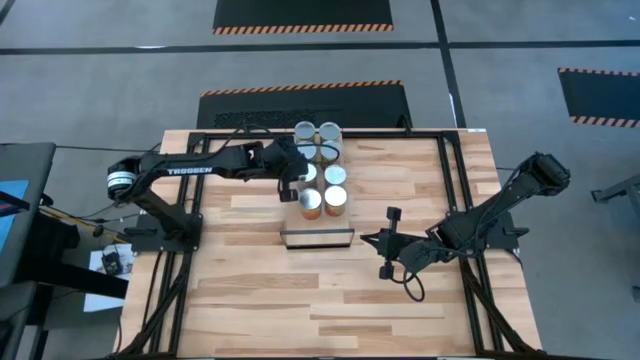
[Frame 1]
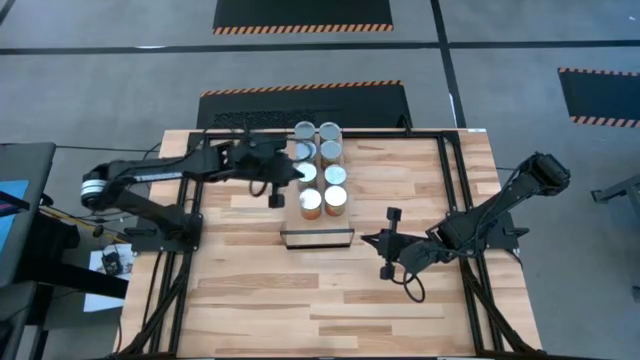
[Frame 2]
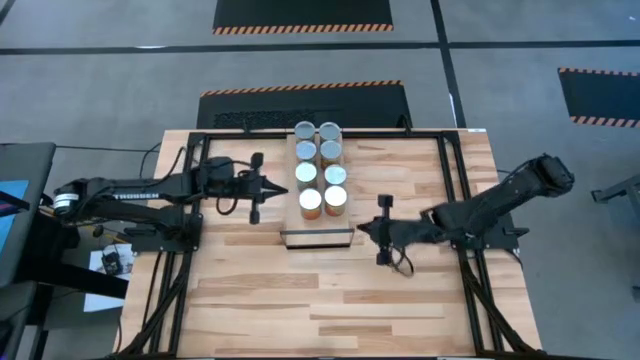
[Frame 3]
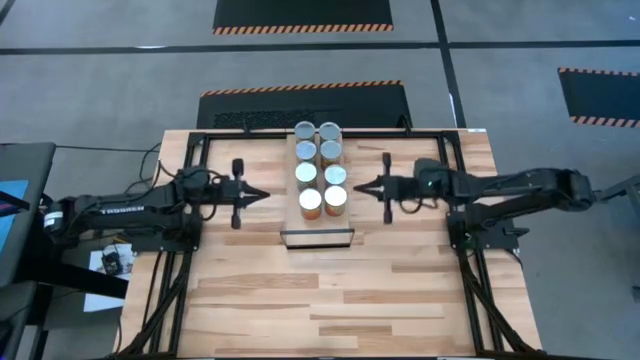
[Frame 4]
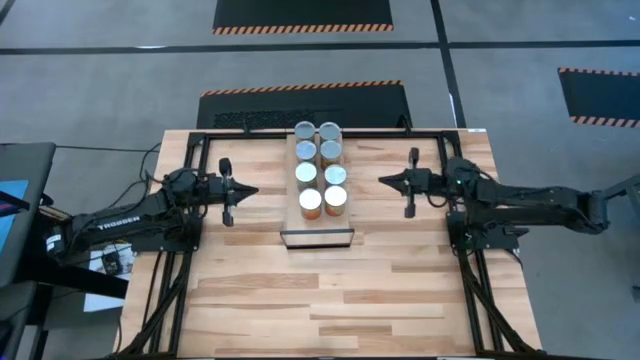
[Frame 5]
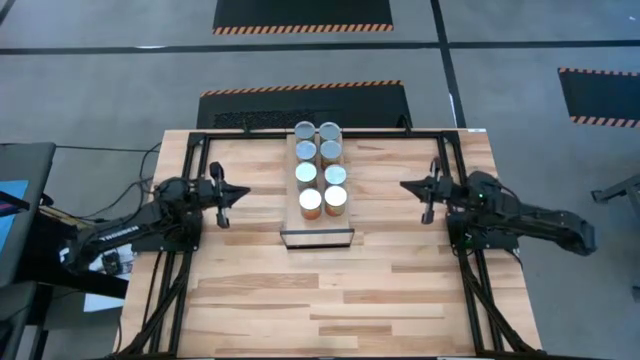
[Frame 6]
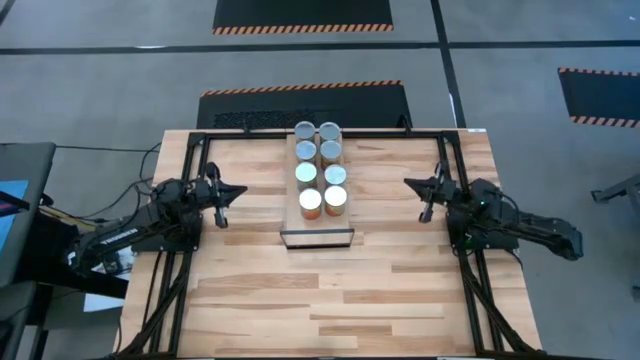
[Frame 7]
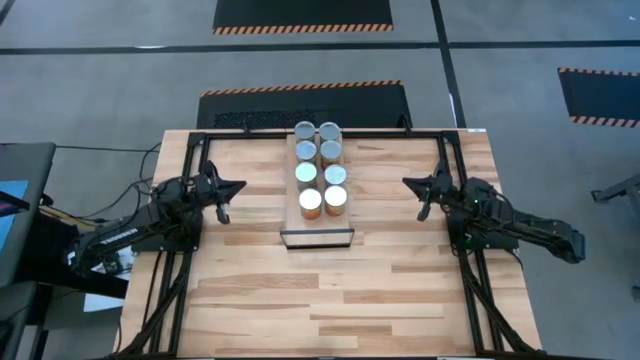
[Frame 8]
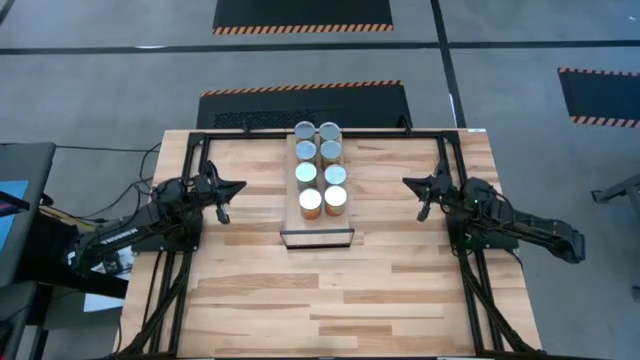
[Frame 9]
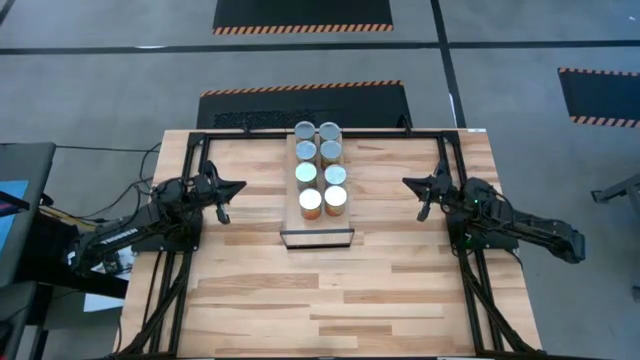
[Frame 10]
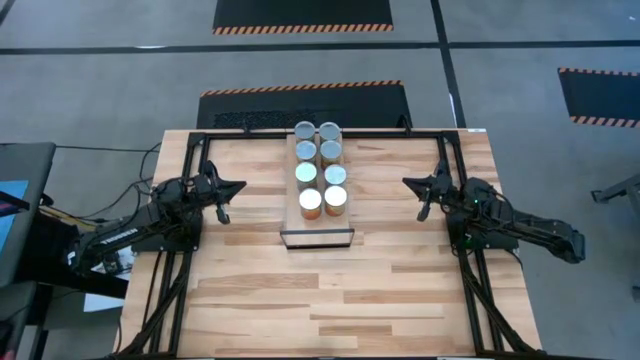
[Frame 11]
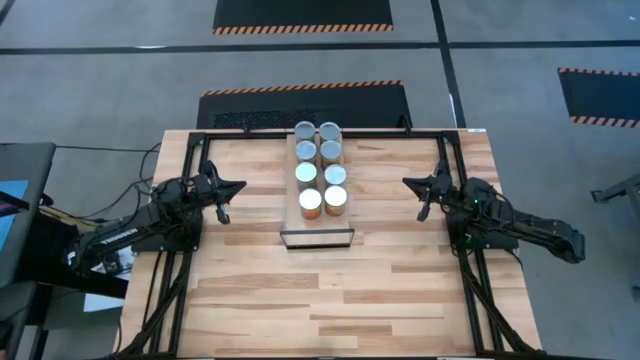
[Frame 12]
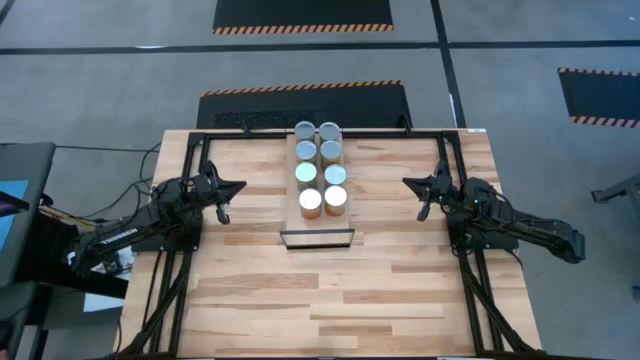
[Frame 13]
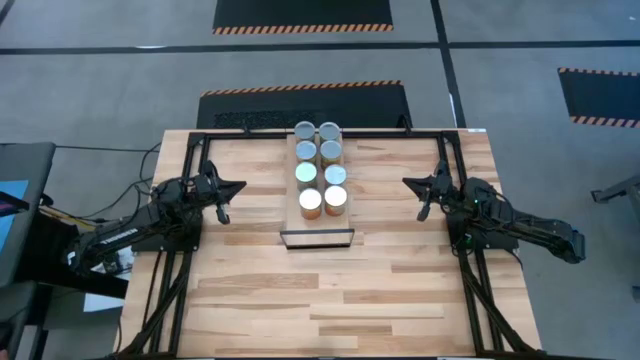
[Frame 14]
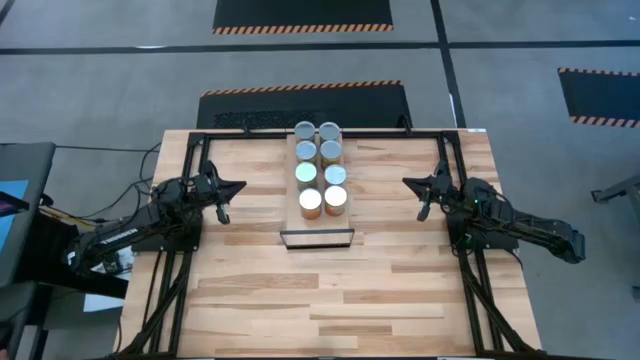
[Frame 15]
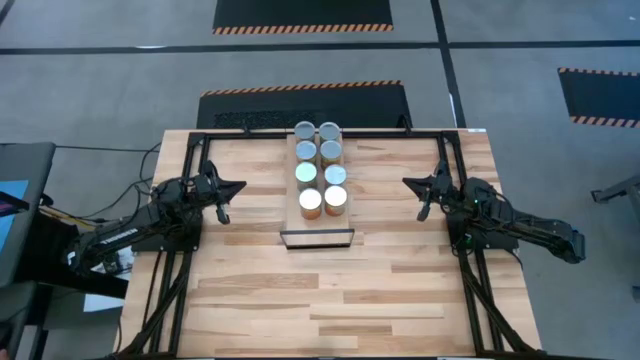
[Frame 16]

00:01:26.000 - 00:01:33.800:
Task: Pick and place cans onto a shelf
Return to Home Position

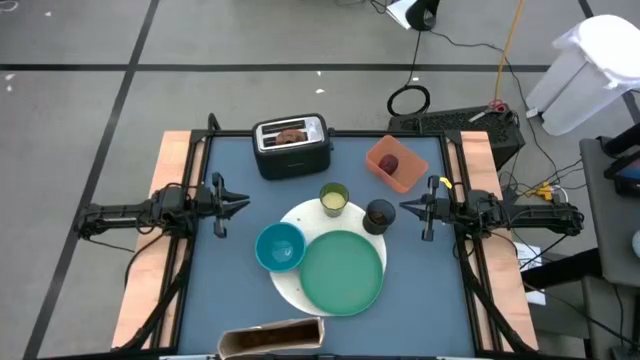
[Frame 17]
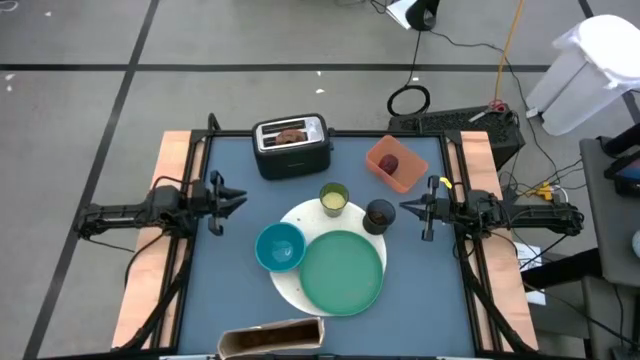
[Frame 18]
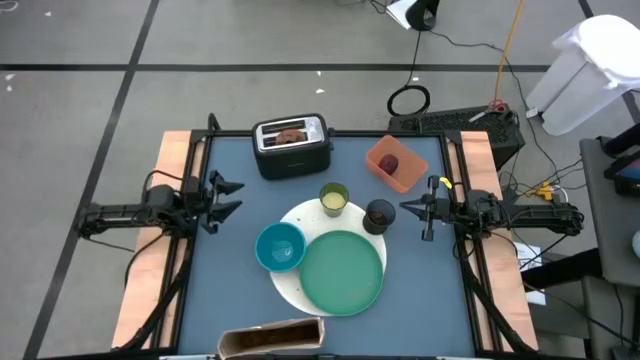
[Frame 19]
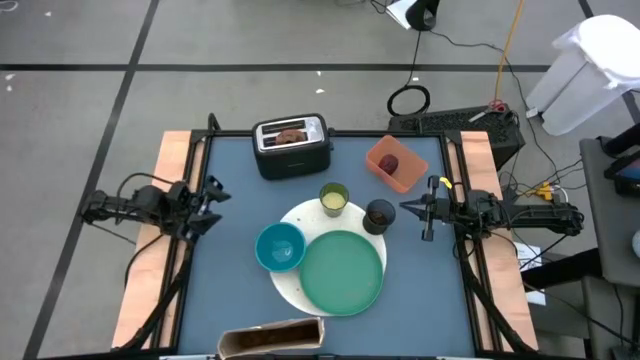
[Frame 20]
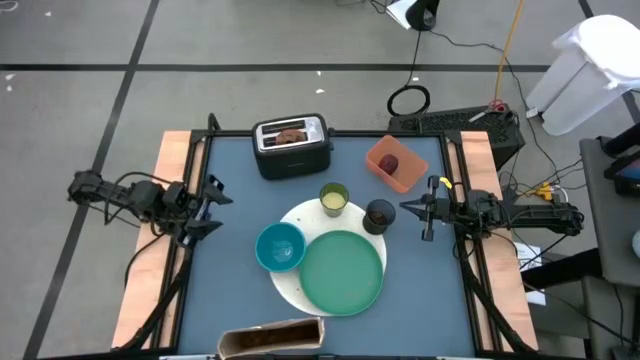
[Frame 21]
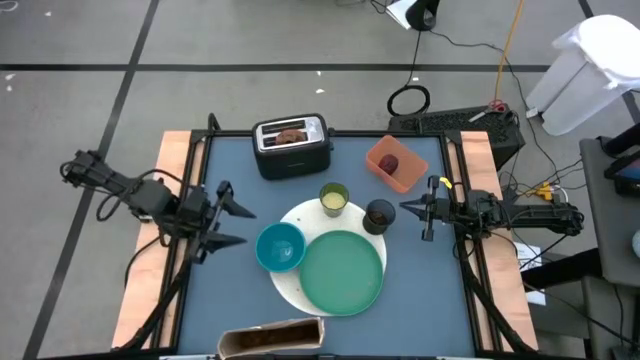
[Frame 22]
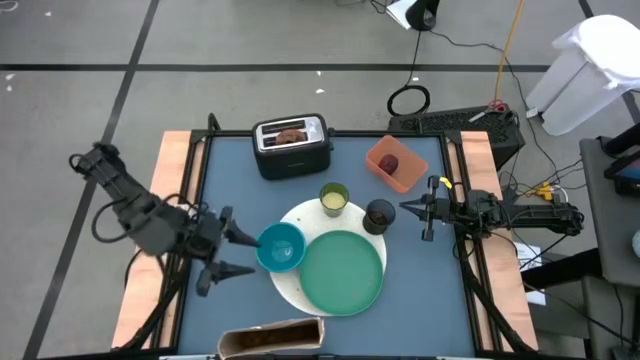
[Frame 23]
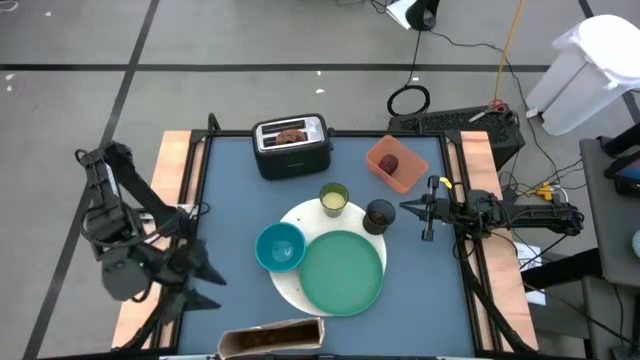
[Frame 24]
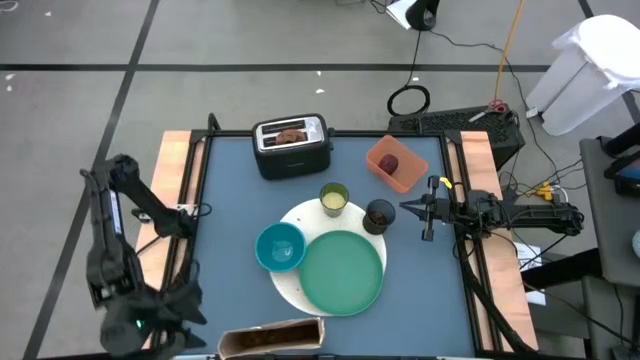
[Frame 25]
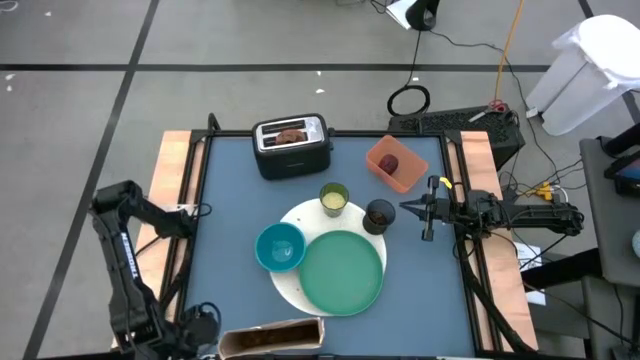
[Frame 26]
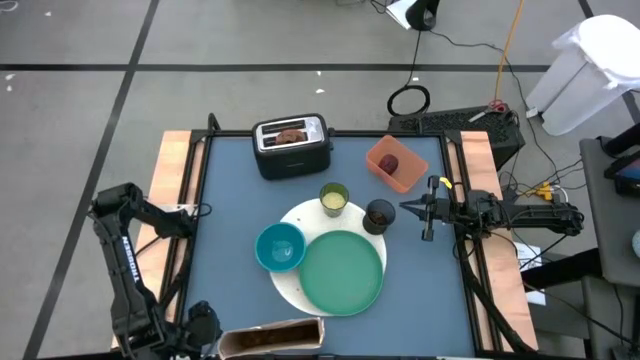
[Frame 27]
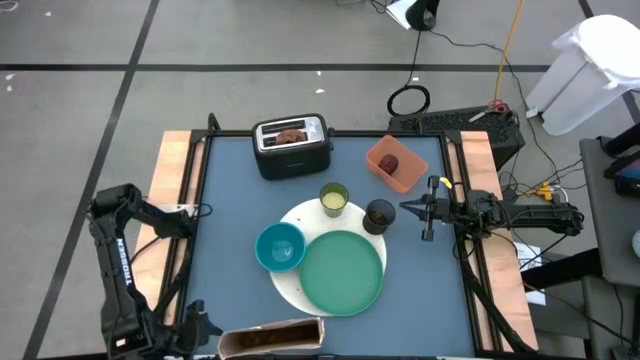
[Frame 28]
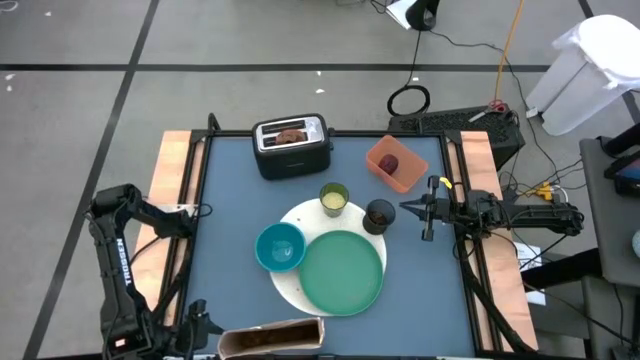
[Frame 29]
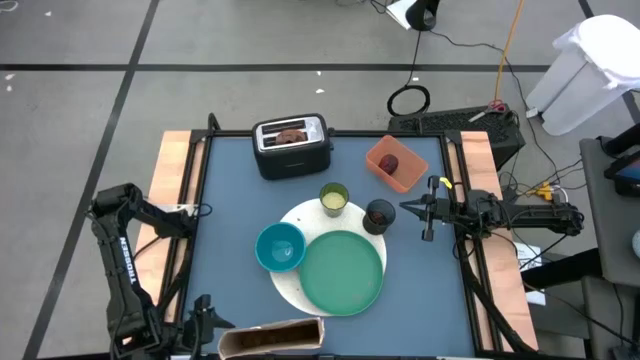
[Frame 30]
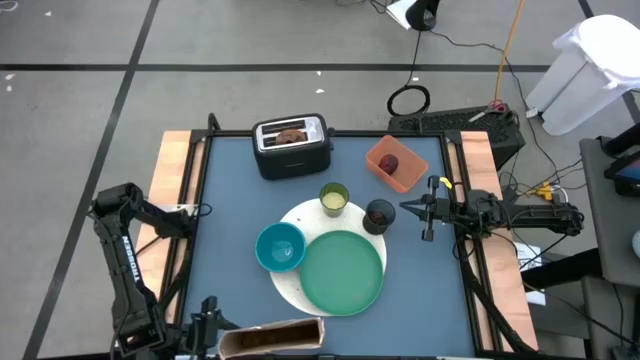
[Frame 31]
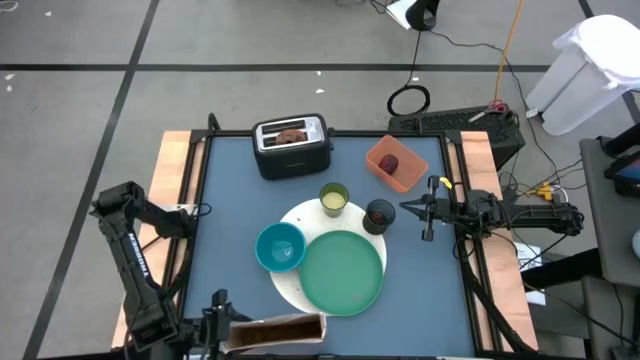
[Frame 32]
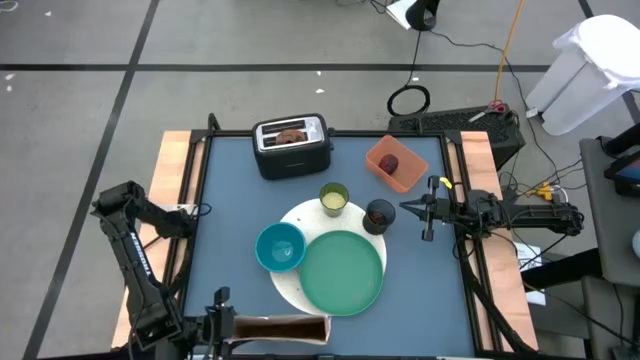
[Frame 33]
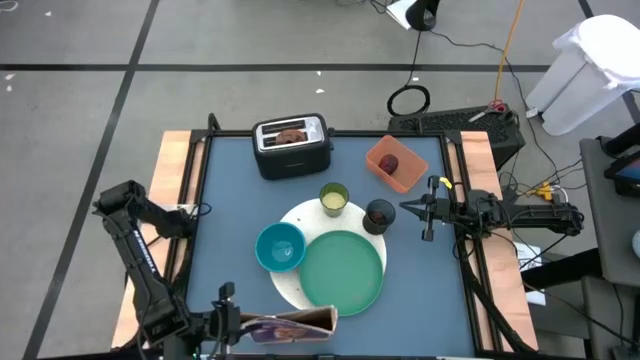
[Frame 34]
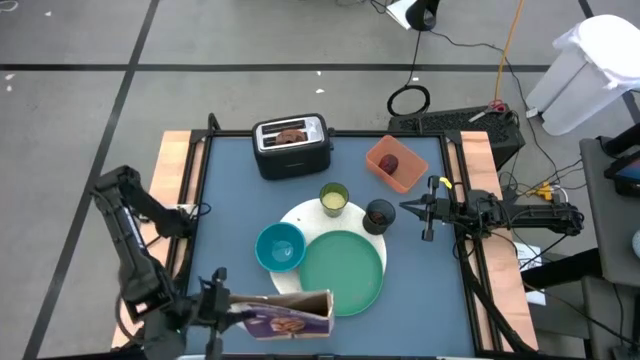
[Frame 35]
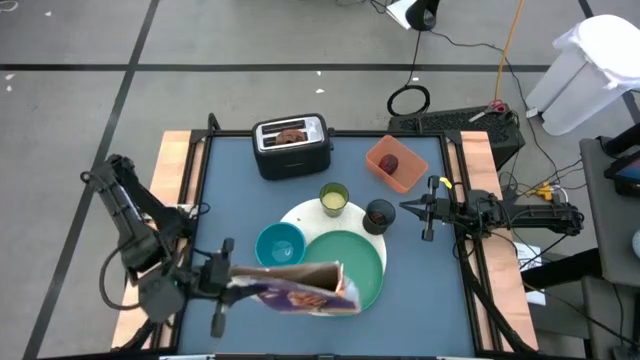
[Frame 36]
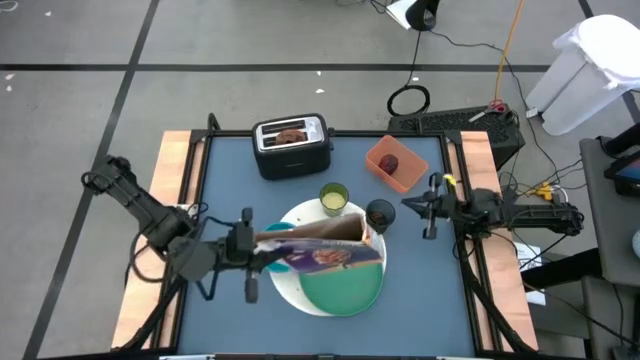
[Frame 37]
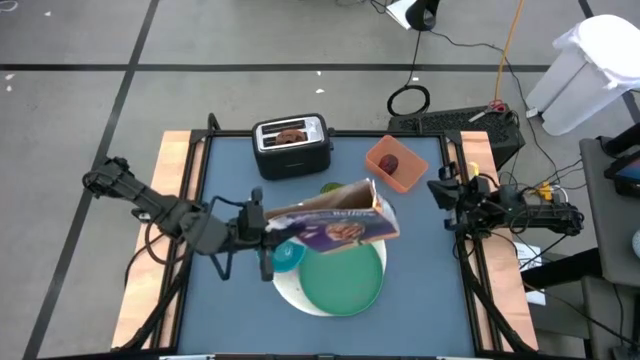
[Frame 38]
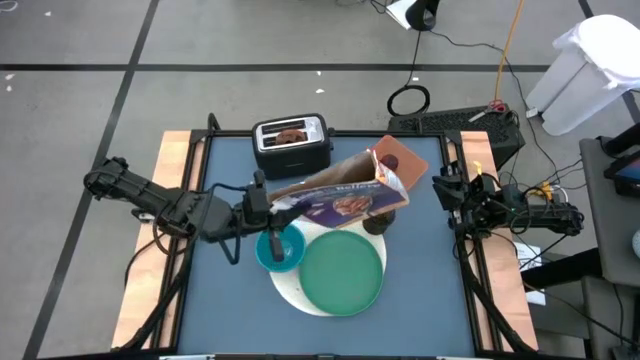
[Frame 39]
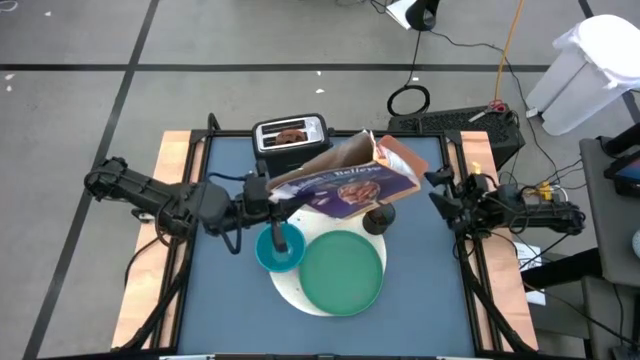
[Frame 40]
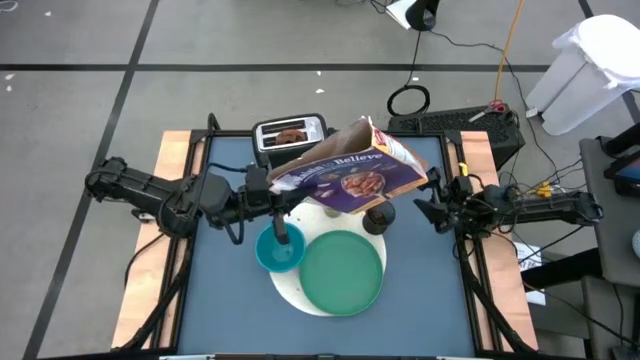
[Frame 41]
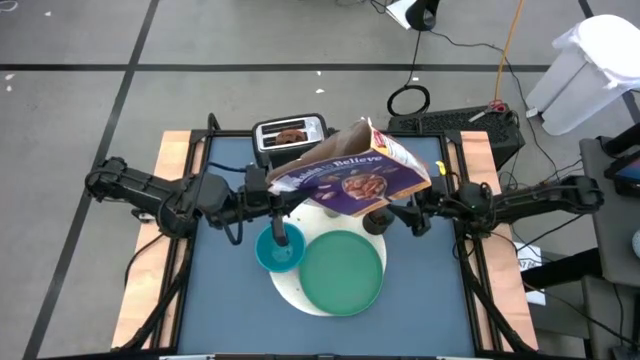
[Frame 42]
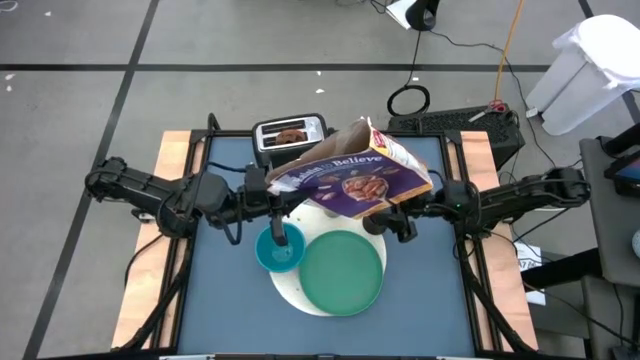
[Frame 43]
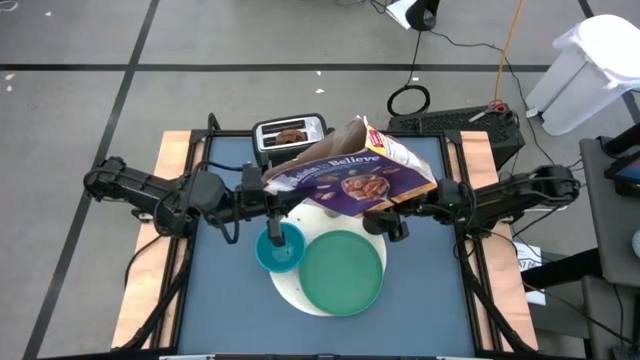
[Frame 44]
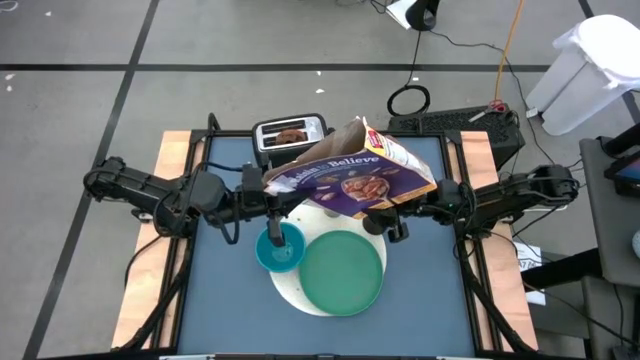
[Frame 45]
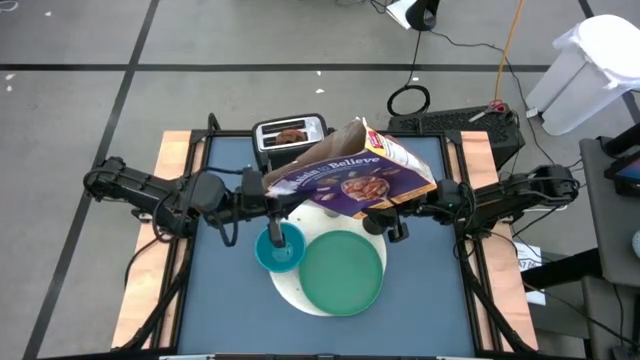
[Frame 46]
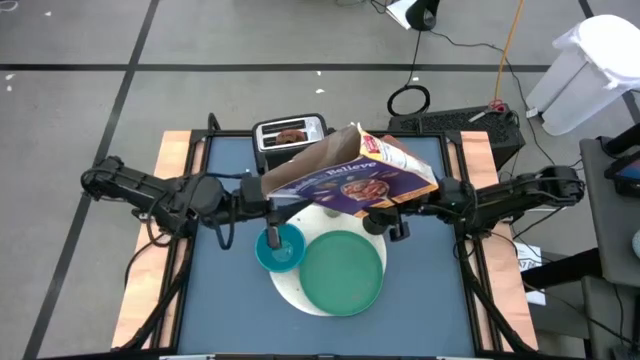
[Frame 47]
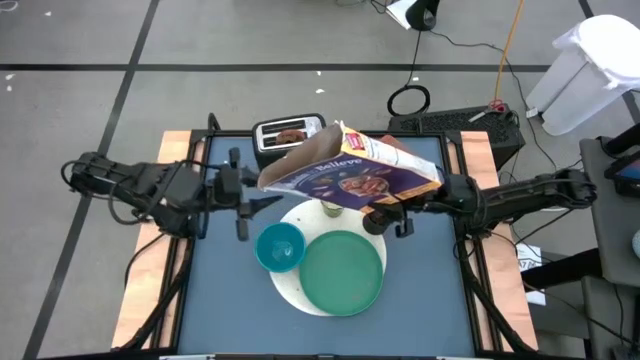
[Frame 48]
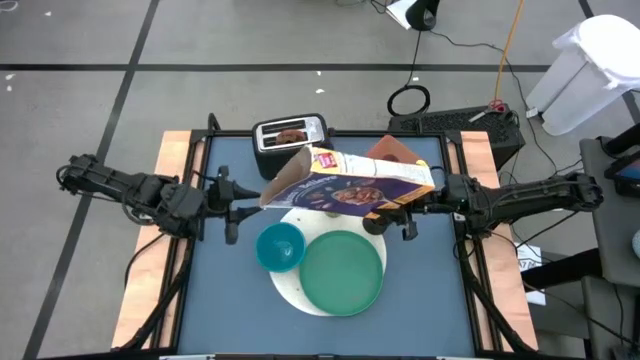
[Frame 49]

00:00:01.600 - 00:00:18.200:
Task: Arrange a breakfast setting
Pour the cereal from the purple cereal box into the blue bowl
